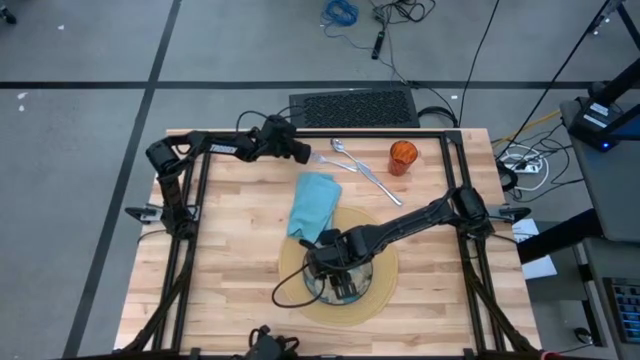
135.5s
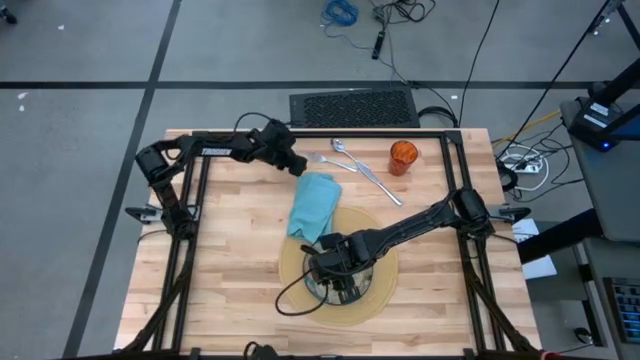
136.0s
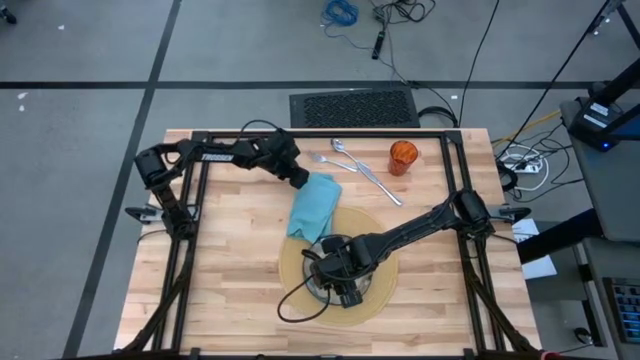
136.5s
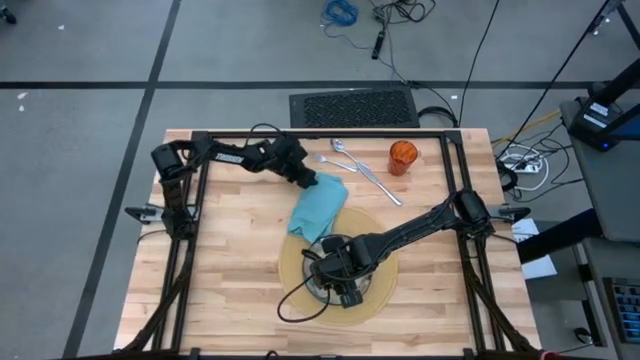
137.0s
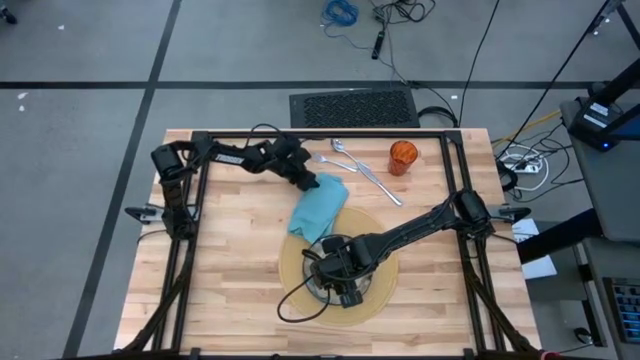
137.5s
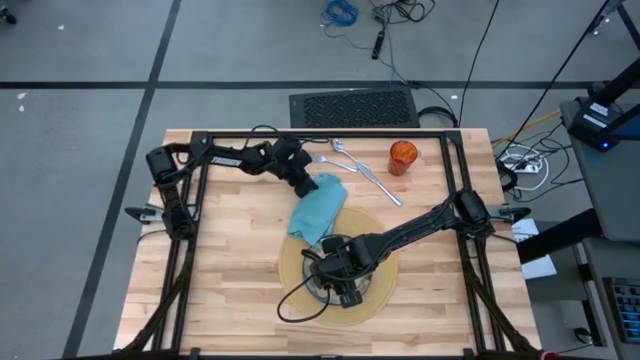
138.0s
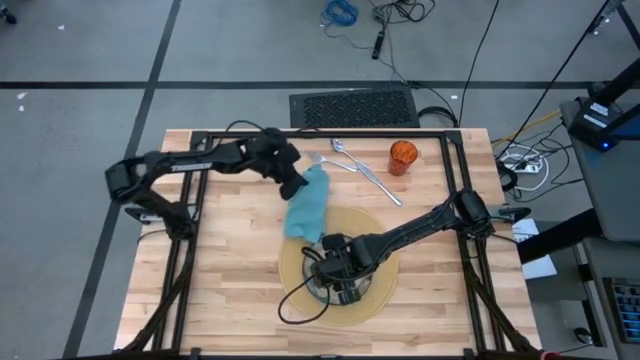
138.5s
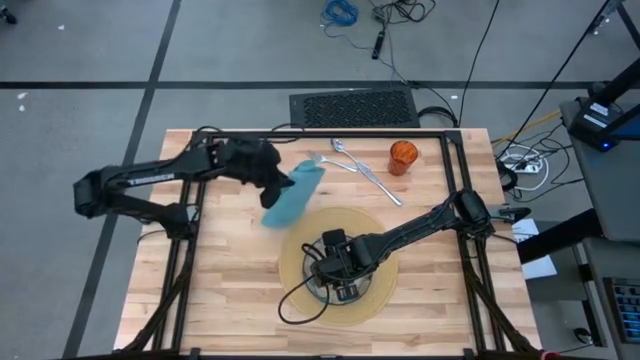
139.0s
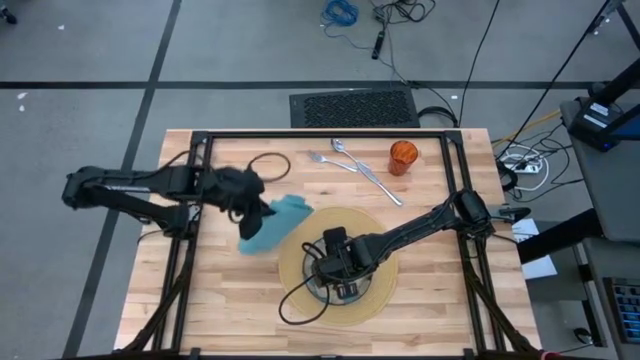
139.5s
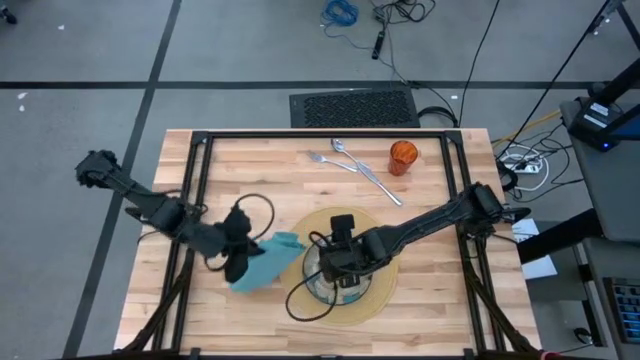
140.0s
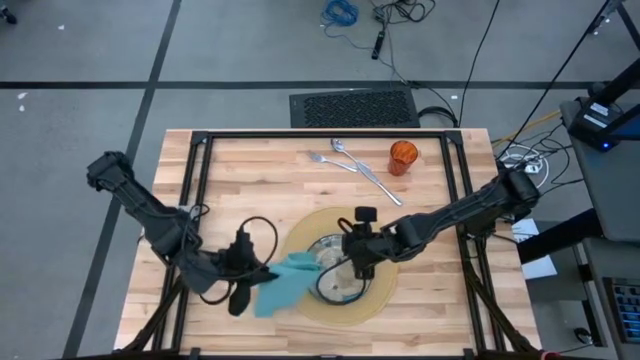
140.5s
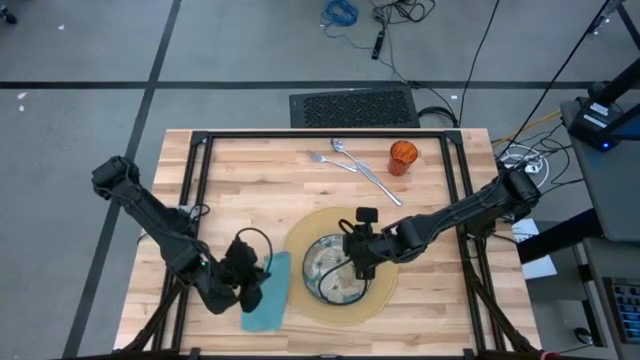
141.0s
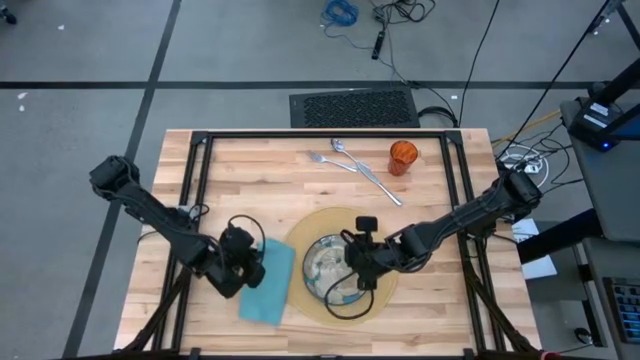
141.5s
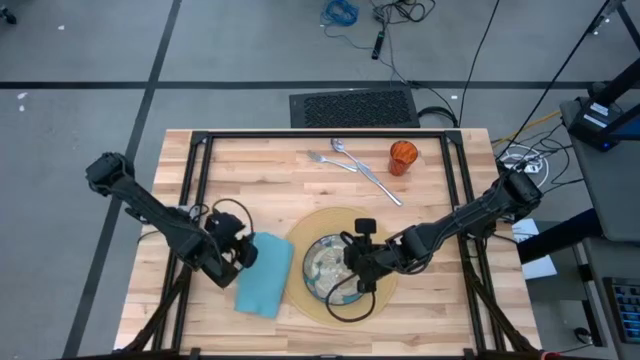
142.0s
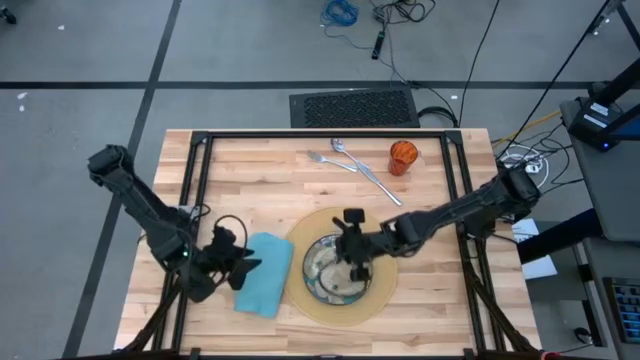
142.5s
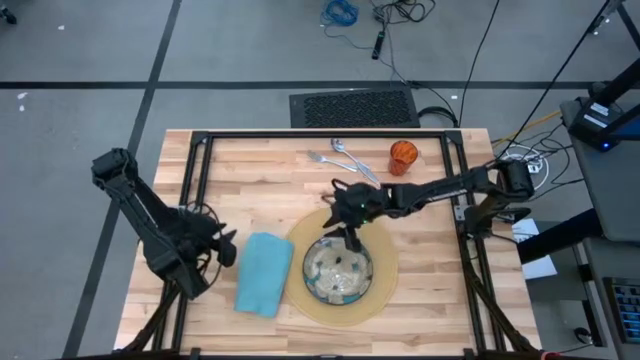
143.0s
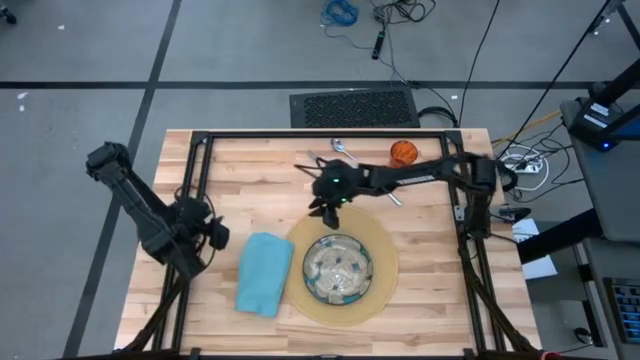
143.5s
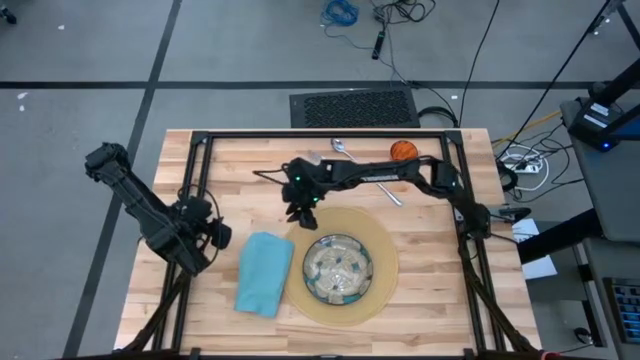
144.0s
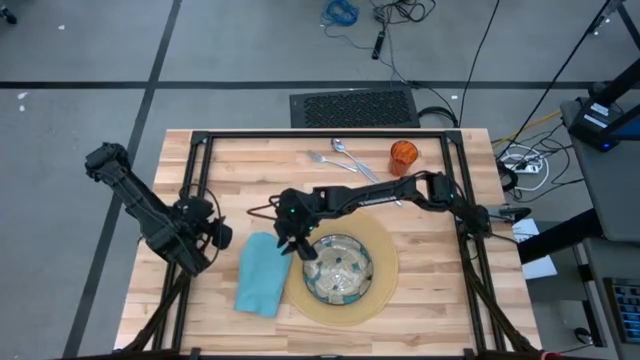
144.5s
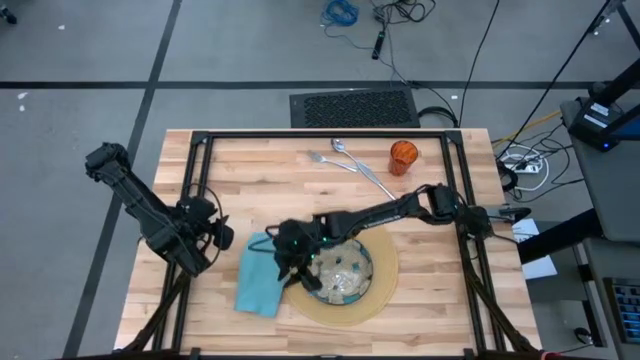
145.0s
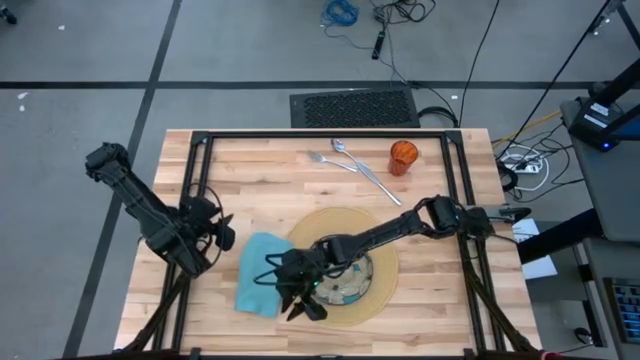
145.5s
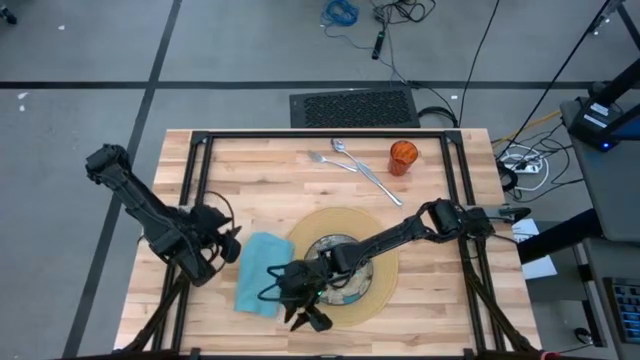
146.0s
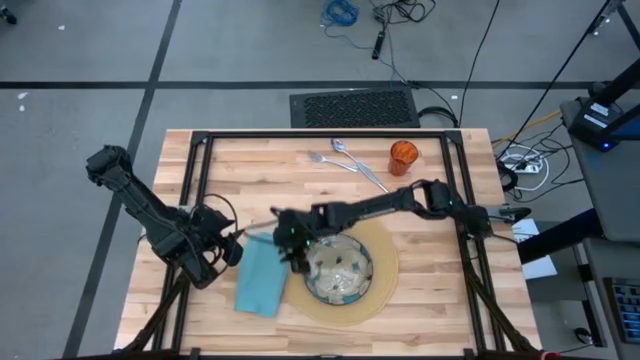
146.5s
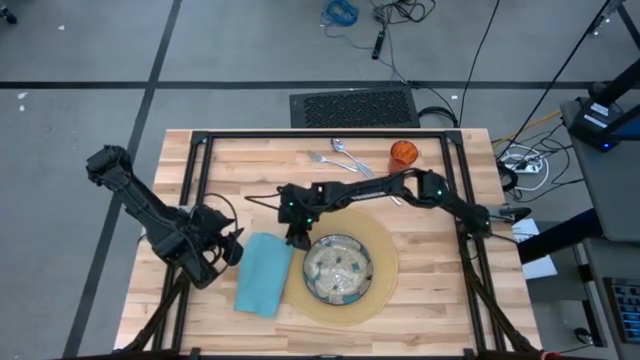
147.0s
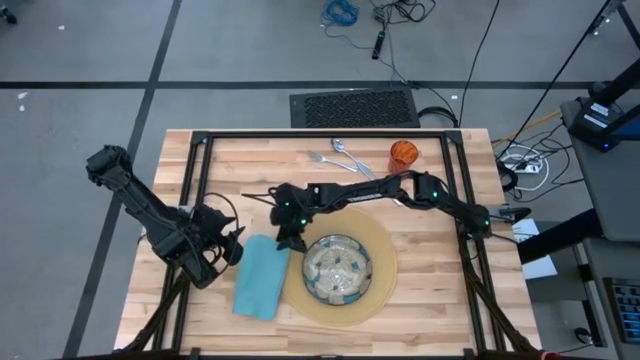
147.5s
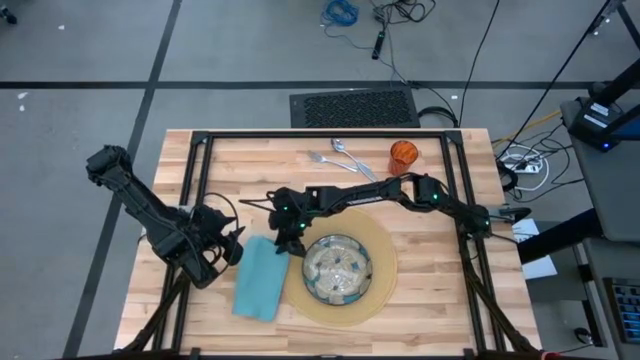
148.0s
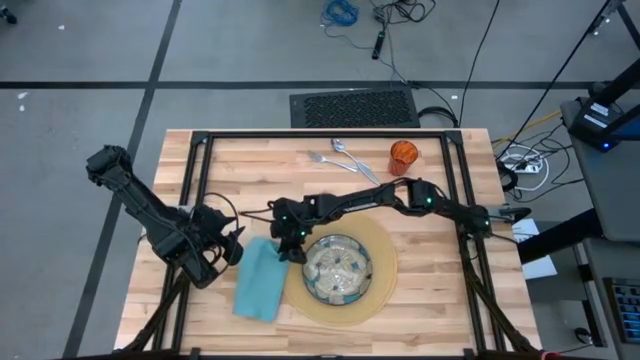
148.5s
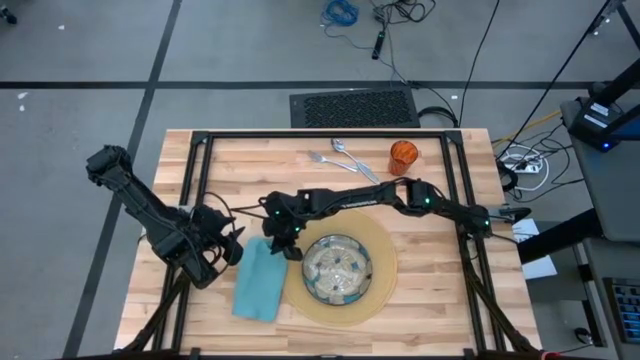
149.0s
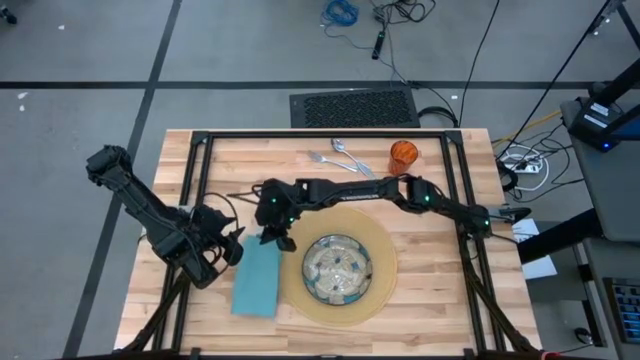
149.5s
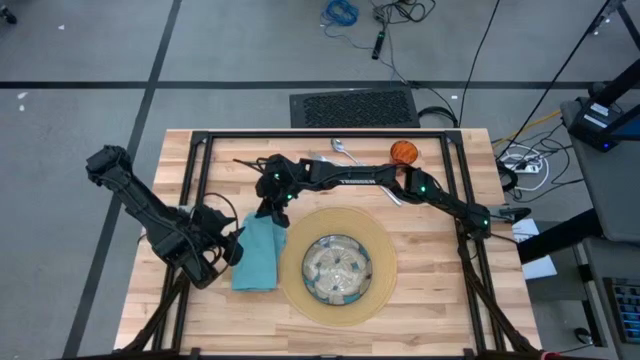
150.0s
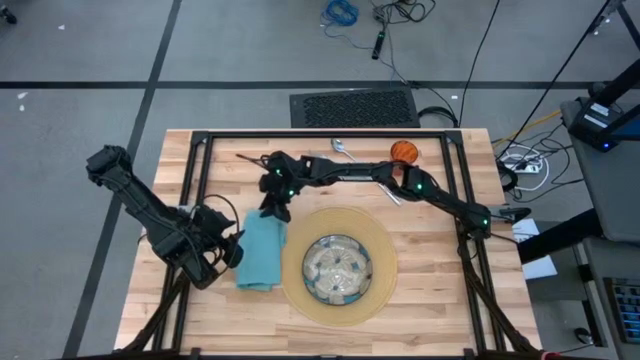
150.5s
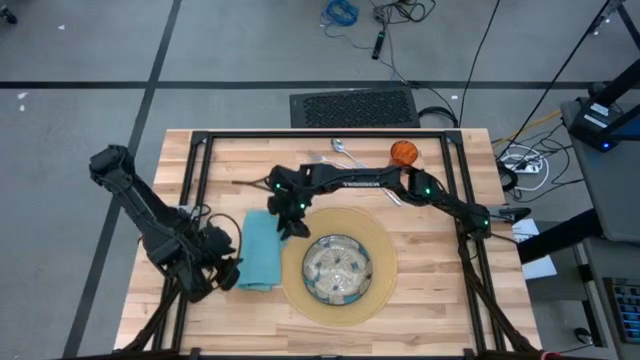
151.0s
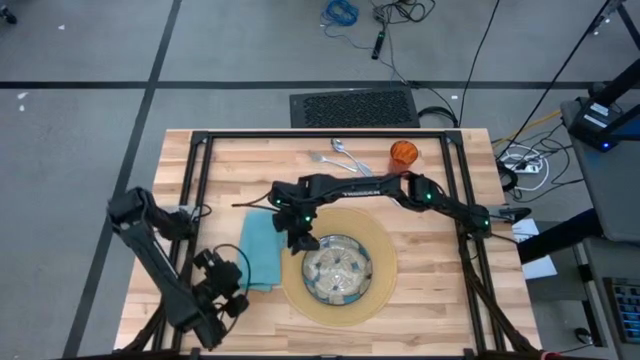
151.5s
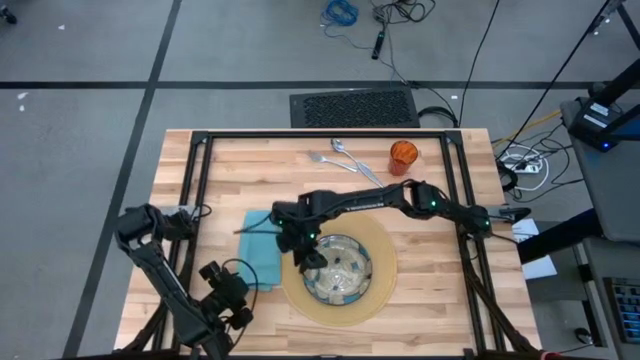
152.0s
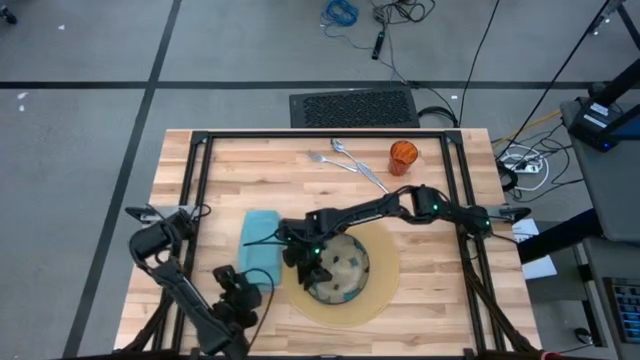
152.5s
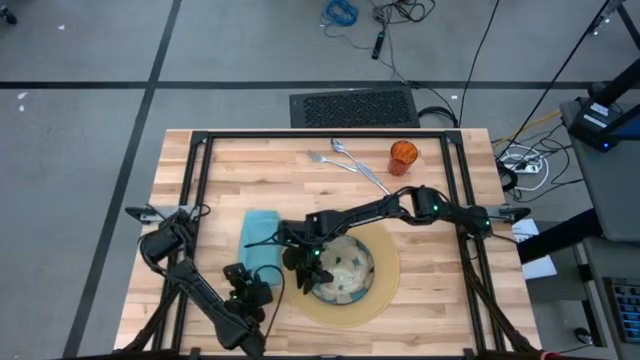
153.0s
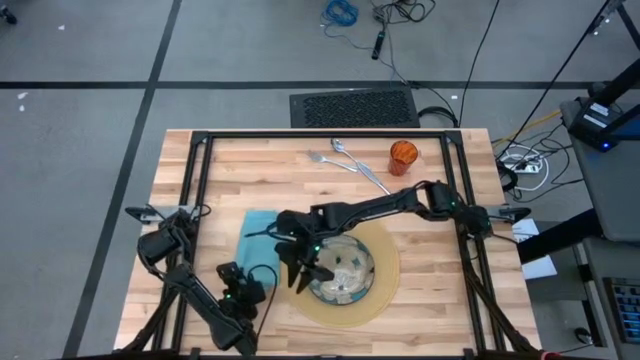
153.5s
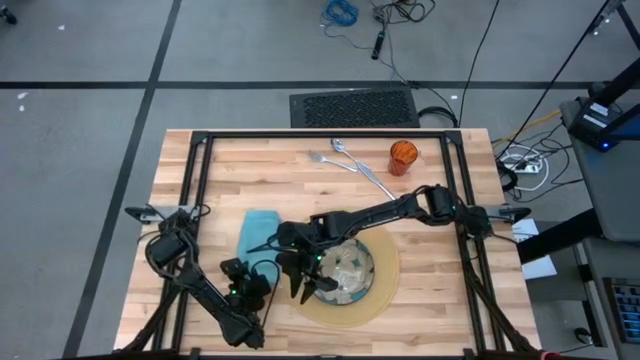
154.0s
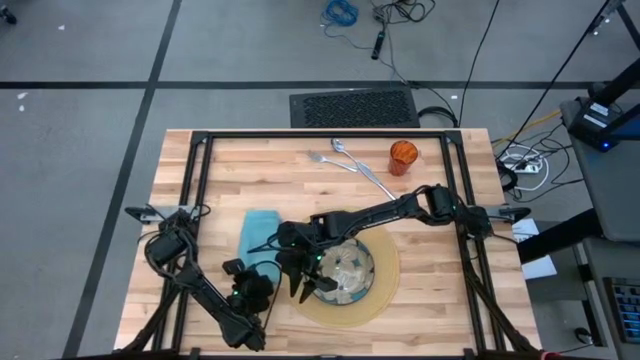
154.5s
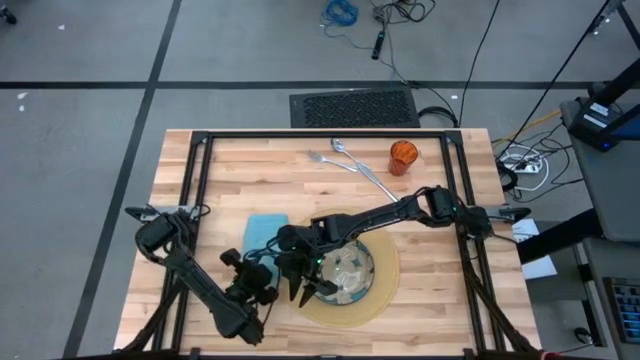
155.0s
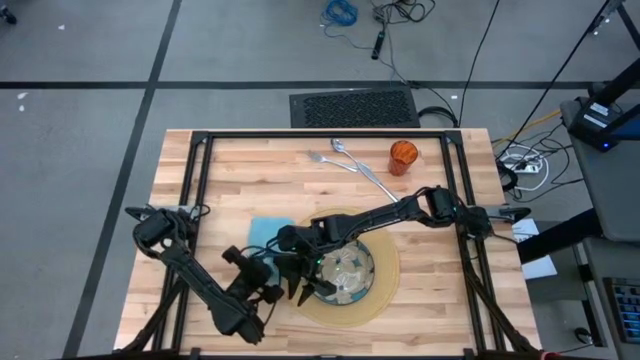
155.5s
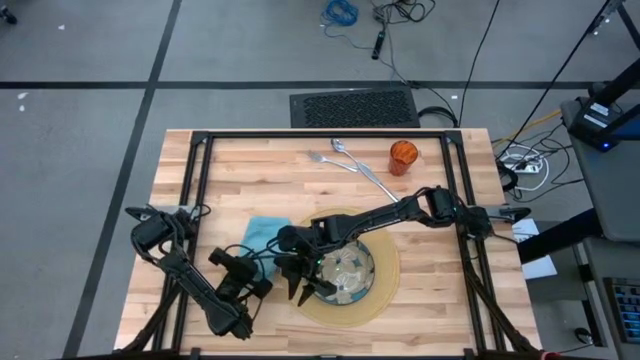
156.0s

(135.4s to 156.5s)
Task: Set table place
Put the blue napkin to the left of the brown mat
